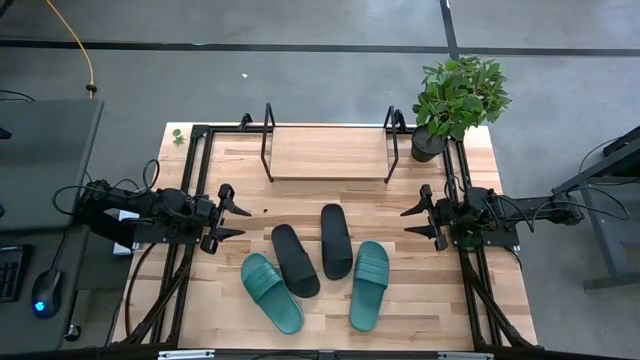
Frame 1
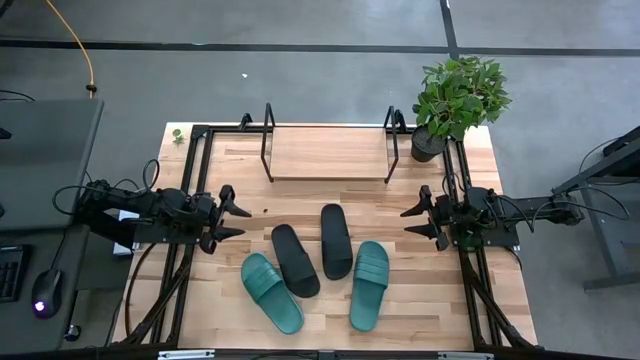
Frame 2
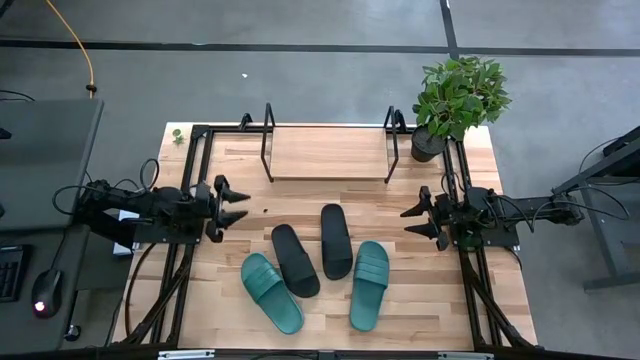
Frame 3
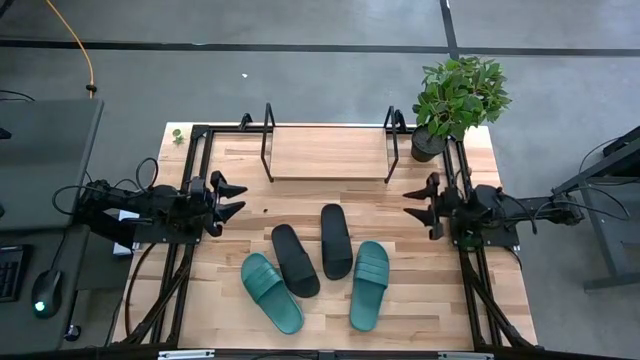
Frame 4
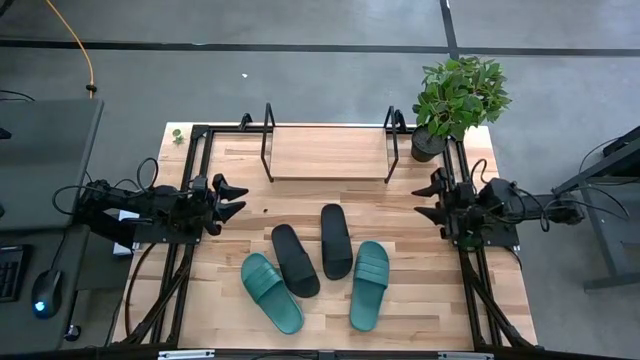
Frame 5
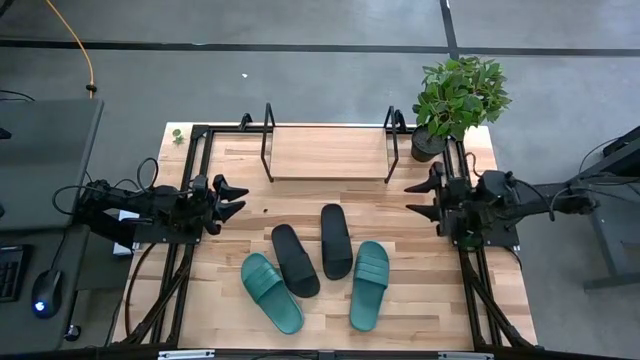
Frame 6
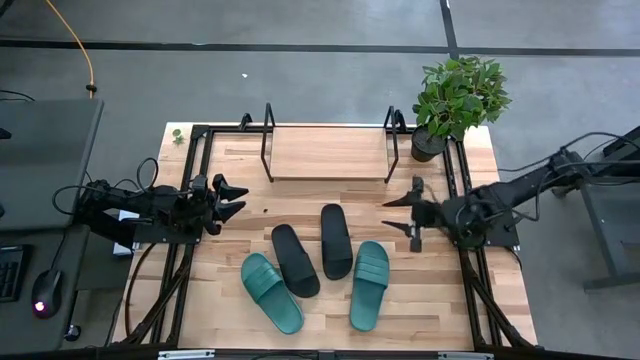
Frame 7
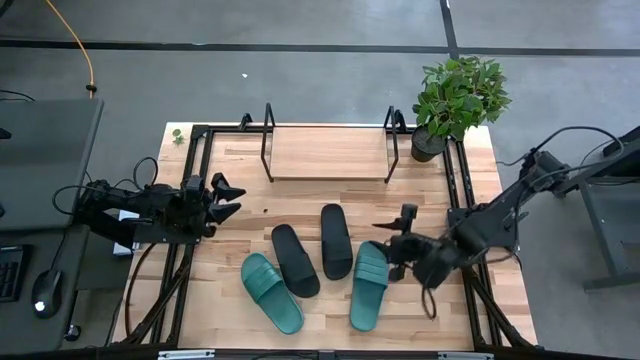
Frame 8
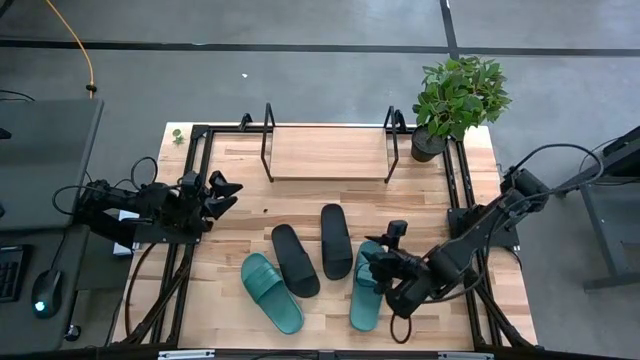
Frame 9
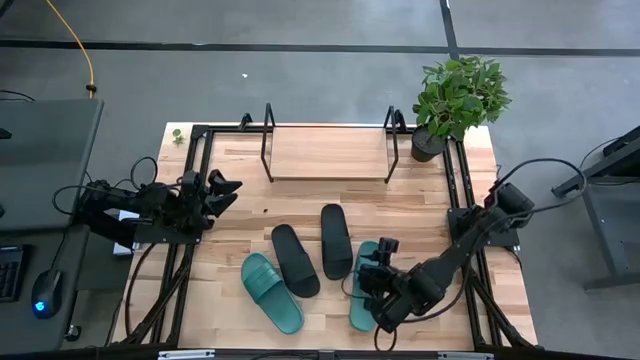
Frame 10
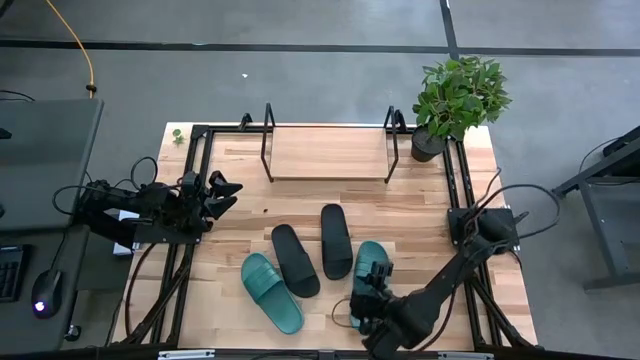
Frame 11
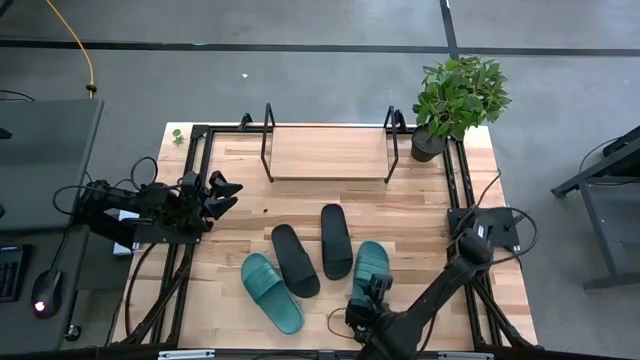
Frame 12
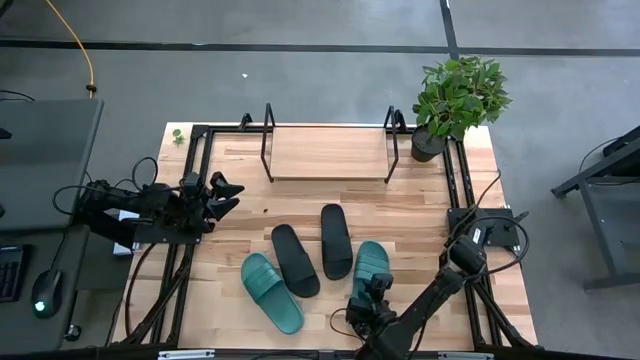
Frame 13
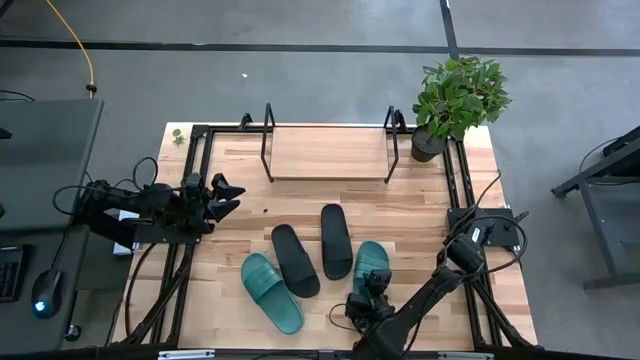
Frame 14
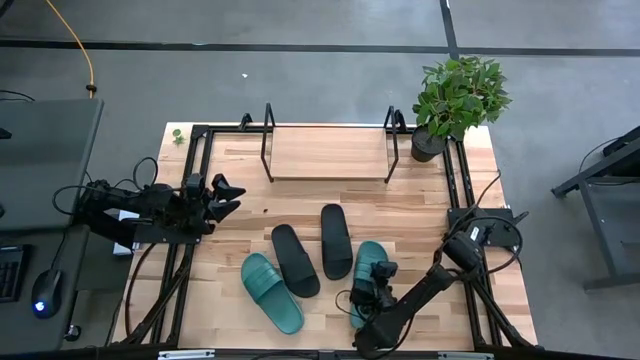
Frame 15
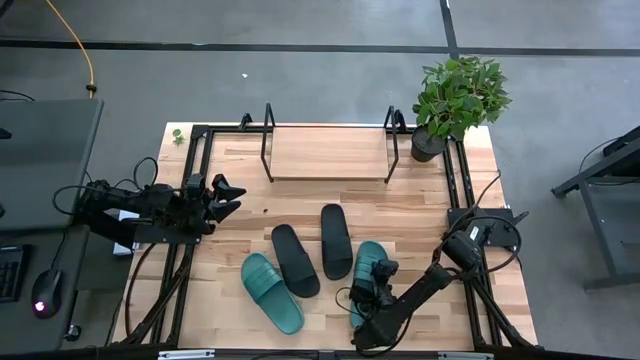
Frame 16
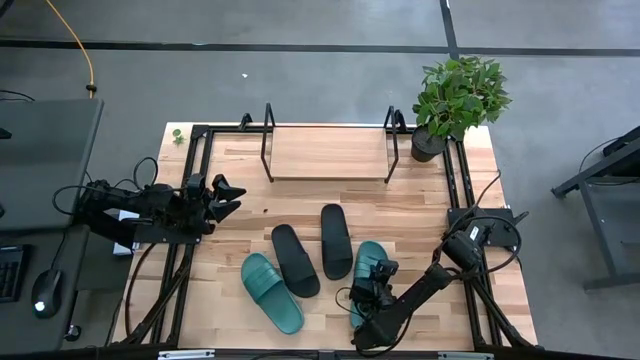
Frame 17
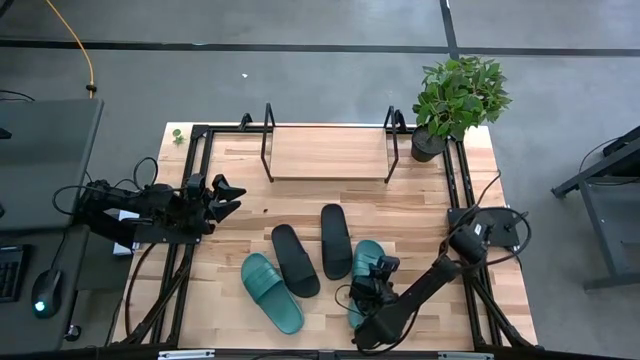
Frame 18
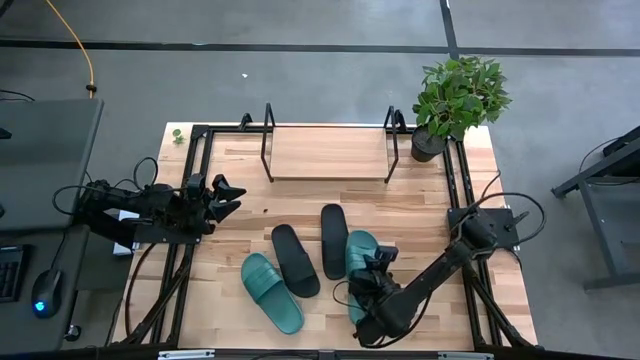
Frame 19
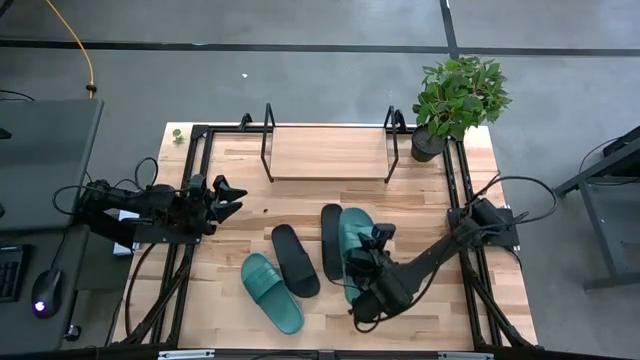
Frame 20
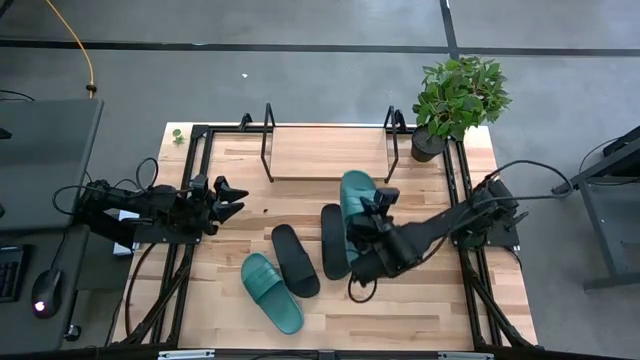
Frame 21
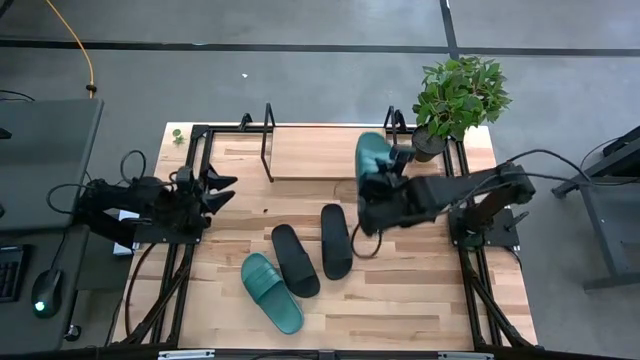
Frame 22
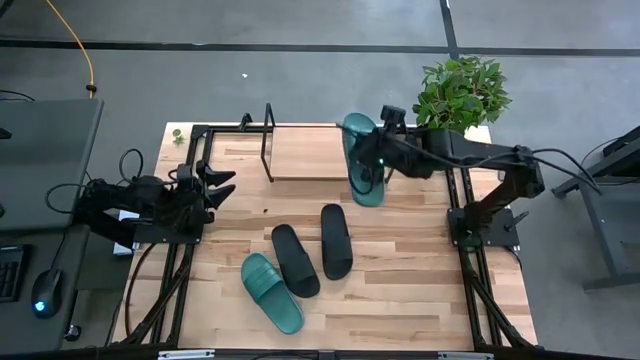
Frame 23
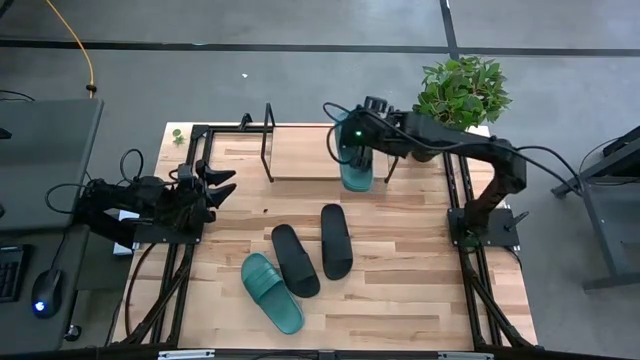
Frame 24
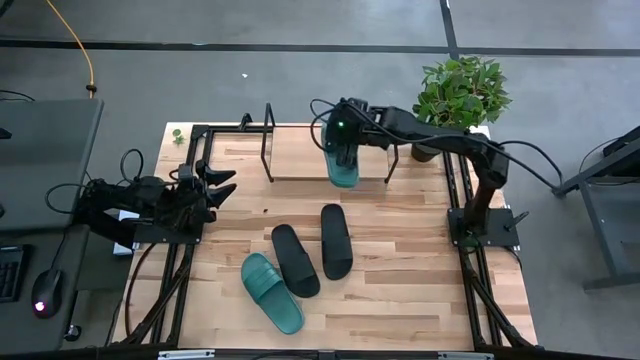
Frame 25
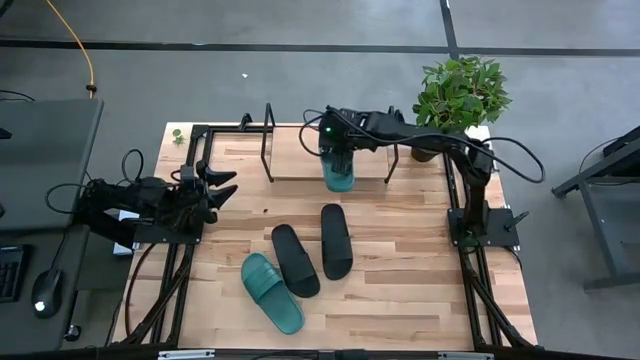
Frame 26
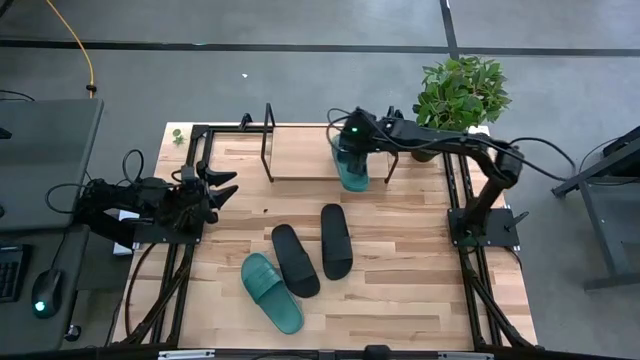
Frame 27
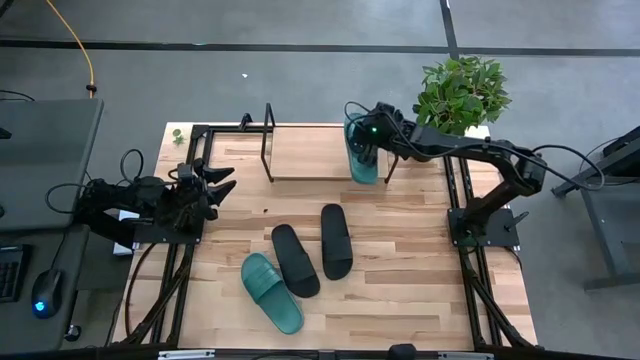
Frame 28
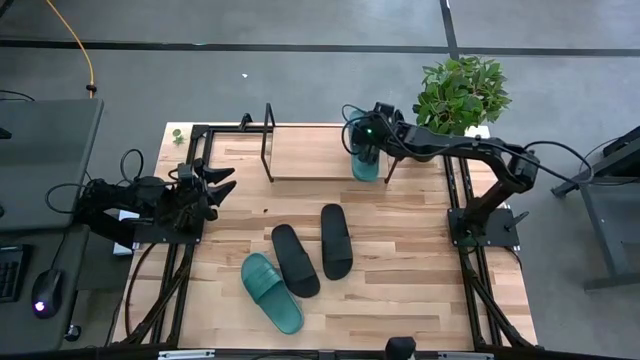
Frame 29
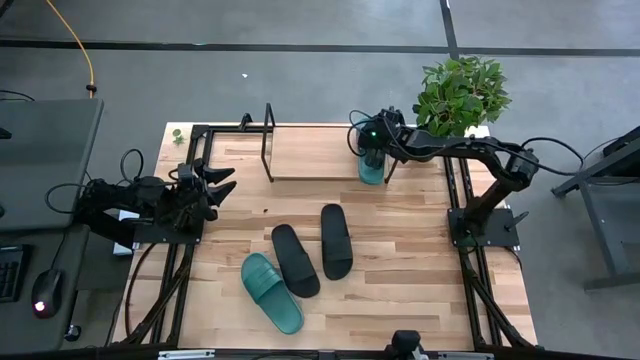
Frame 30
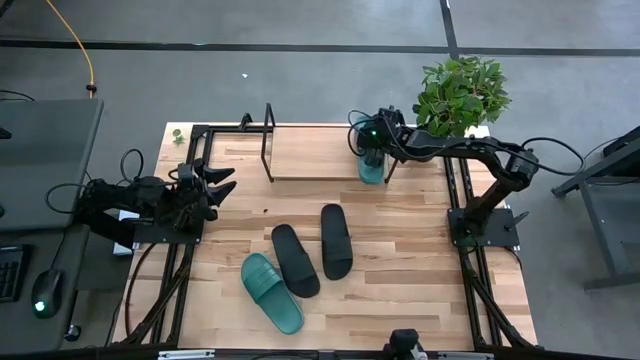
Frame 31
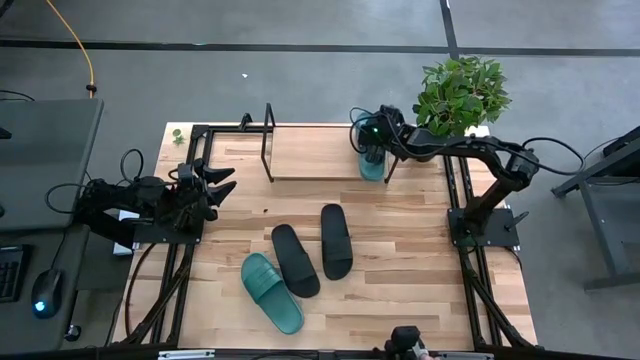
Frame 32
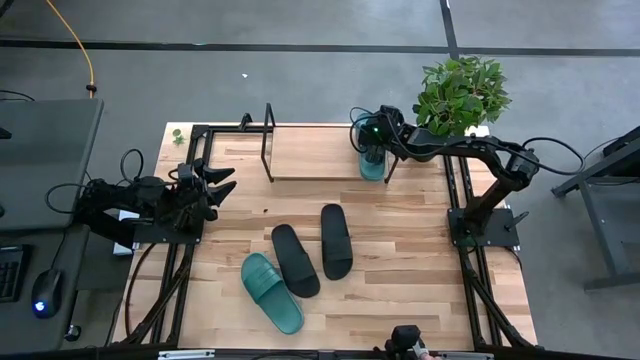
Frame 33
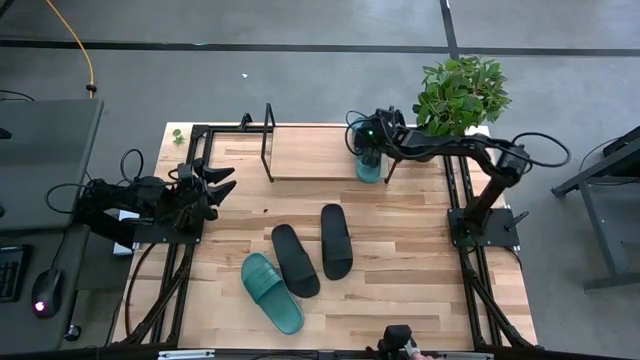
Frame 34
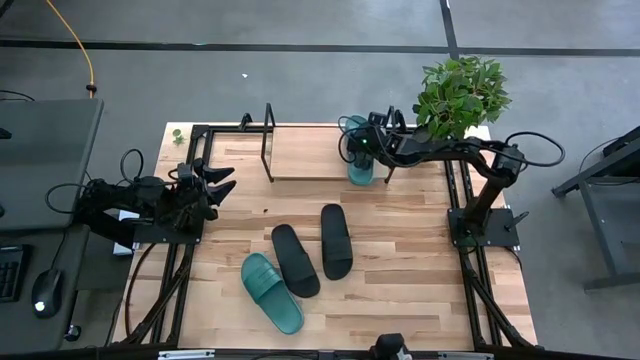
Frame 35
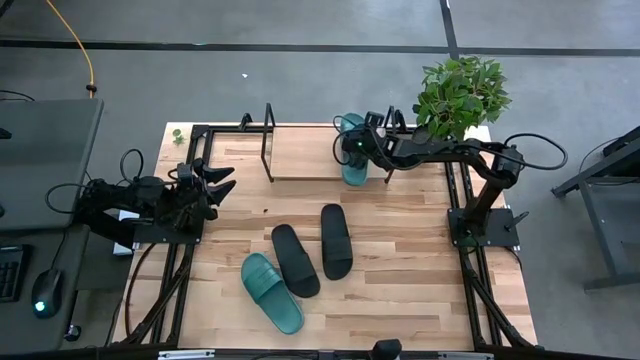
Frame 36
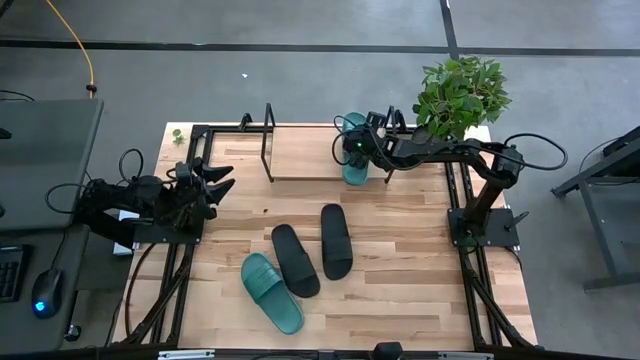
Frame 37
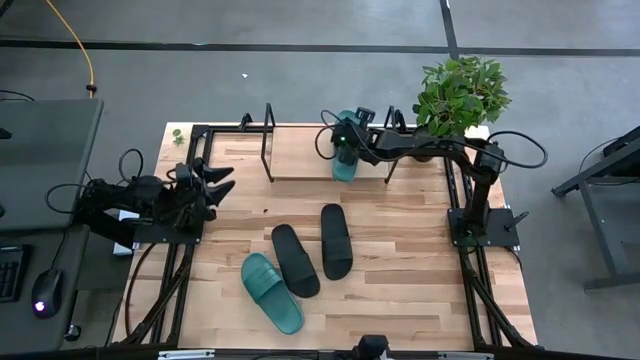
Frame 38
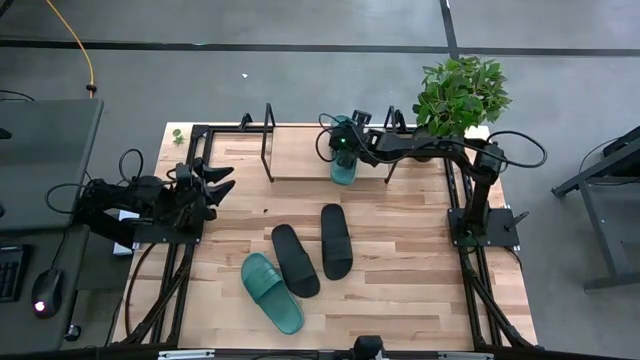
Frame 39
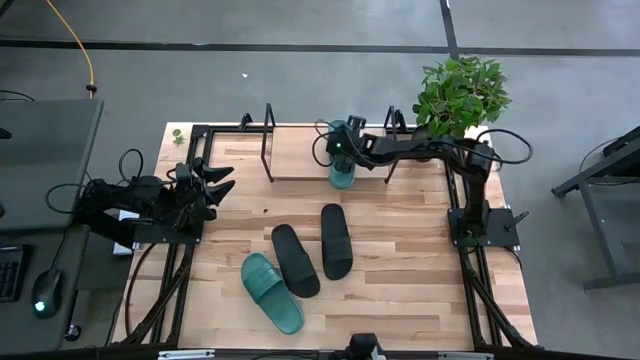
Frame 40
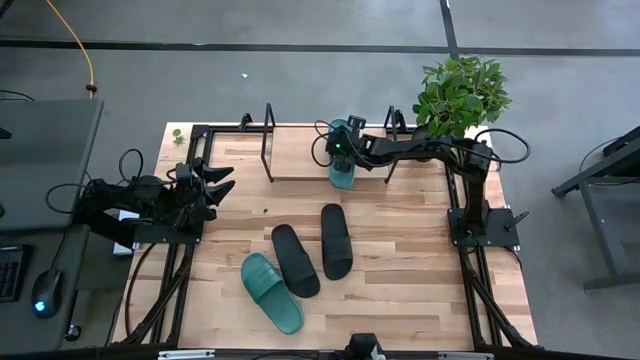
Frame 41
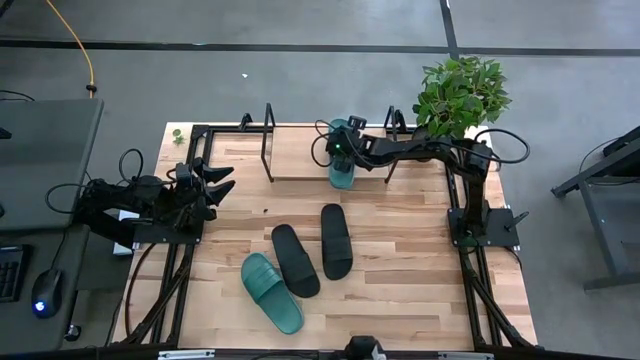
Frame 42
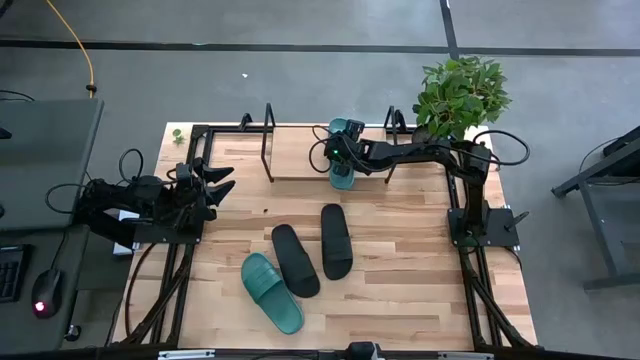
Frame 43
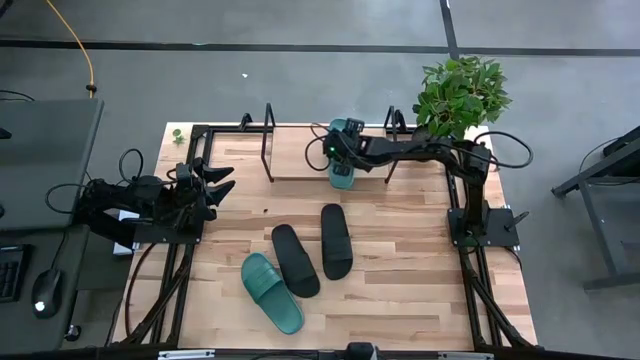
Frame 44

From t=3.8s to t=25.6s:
Task: Pick and place slides into the shelf
Put the right green slide on the shelf
